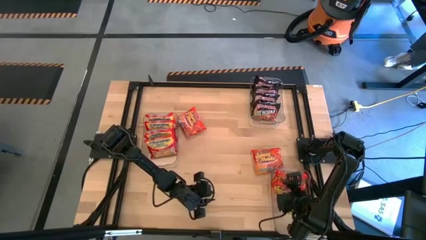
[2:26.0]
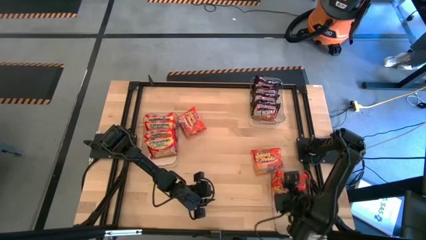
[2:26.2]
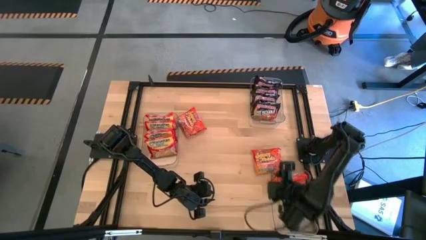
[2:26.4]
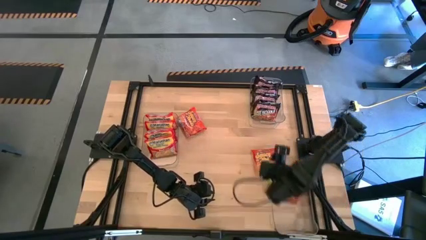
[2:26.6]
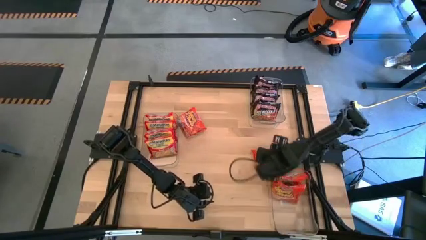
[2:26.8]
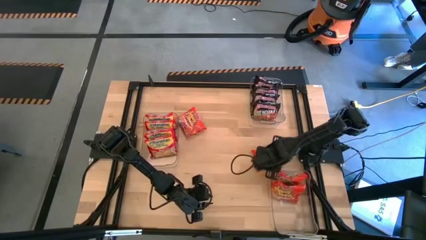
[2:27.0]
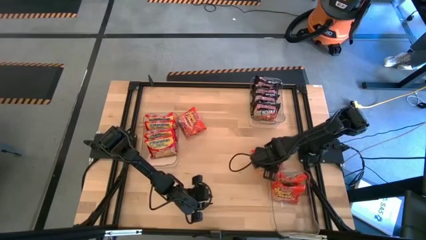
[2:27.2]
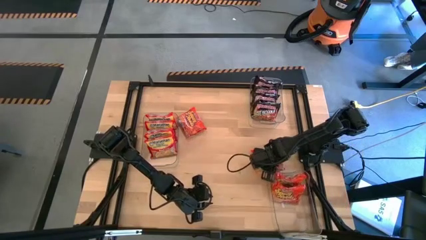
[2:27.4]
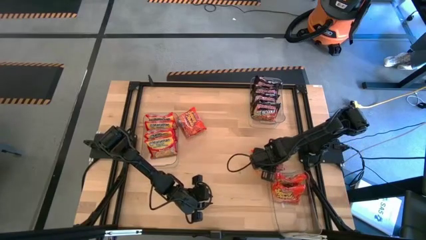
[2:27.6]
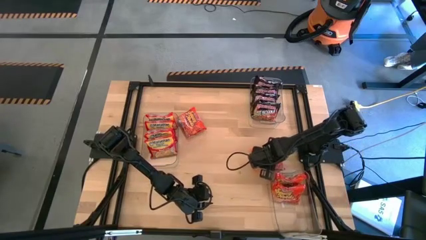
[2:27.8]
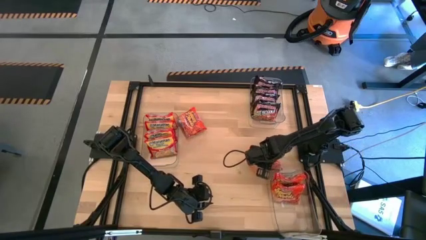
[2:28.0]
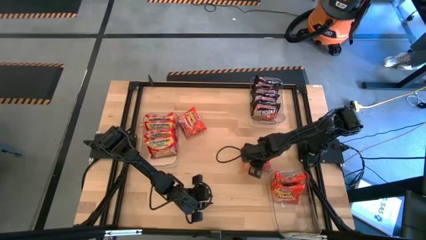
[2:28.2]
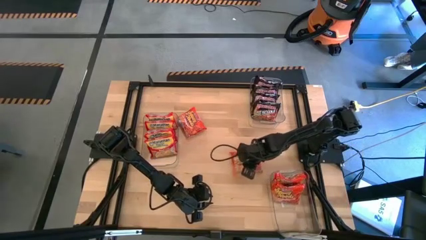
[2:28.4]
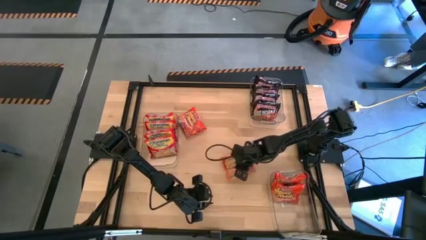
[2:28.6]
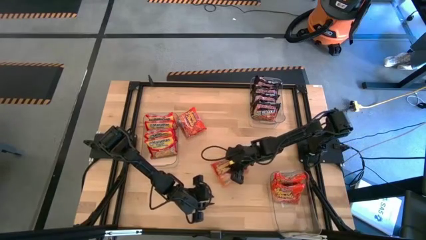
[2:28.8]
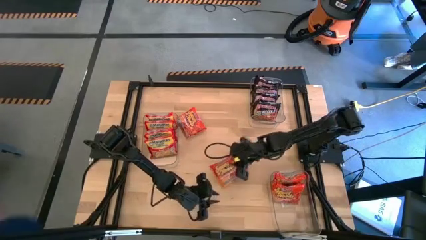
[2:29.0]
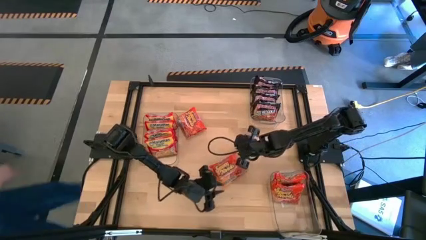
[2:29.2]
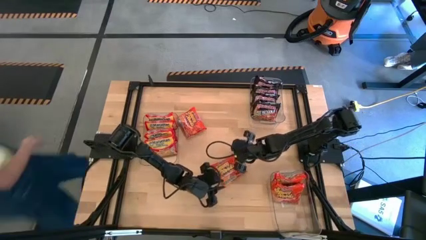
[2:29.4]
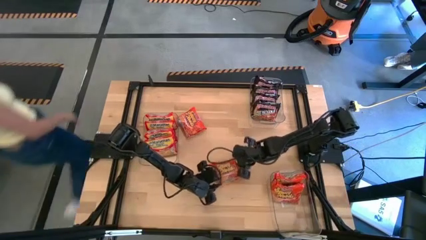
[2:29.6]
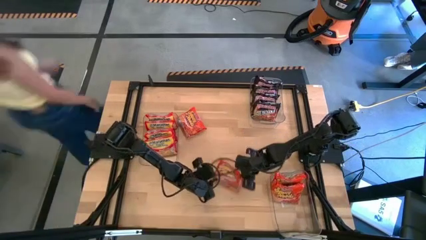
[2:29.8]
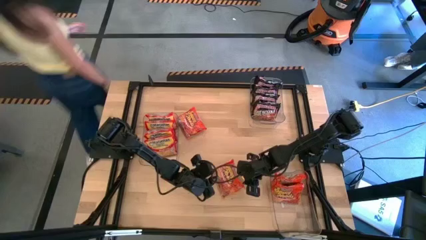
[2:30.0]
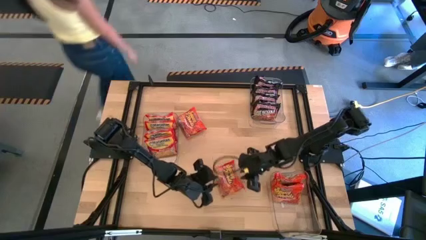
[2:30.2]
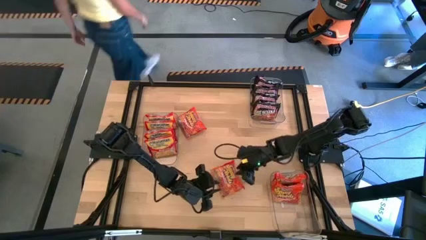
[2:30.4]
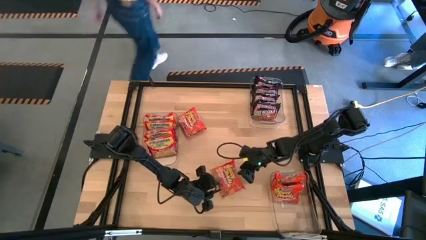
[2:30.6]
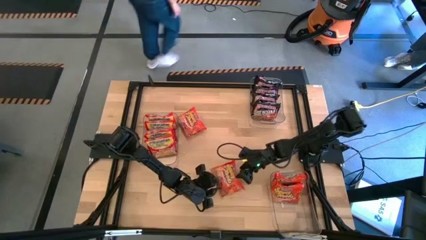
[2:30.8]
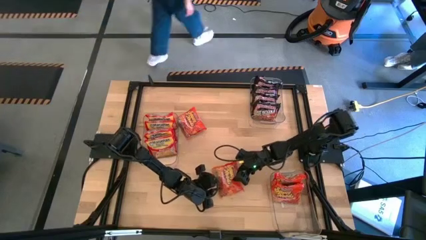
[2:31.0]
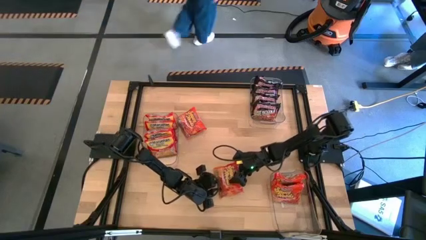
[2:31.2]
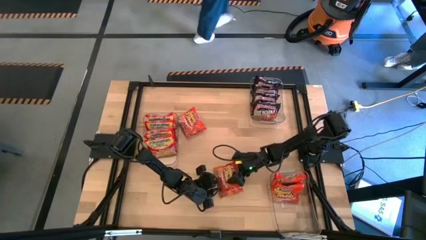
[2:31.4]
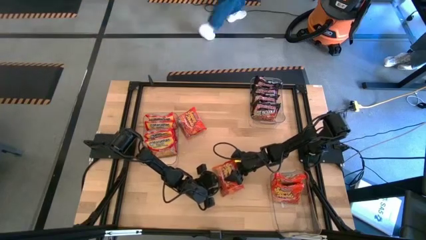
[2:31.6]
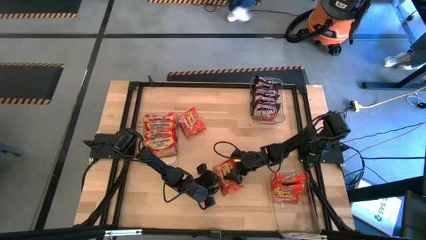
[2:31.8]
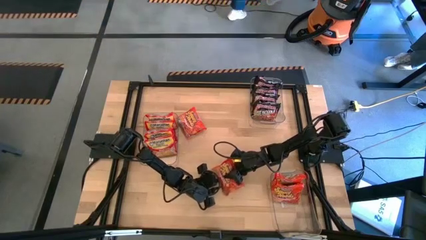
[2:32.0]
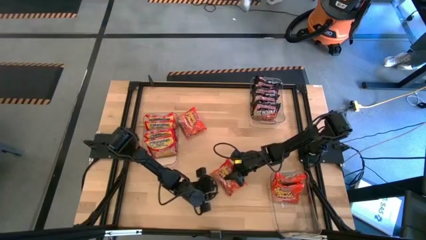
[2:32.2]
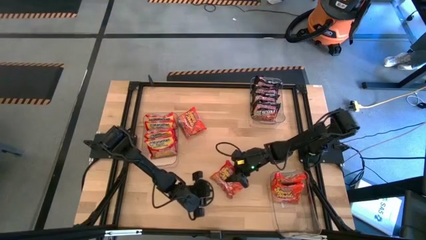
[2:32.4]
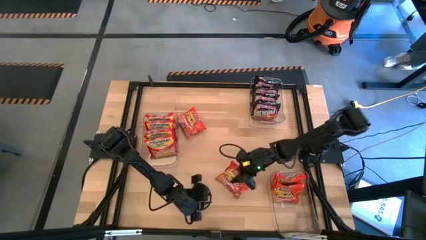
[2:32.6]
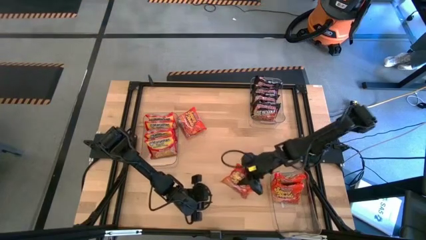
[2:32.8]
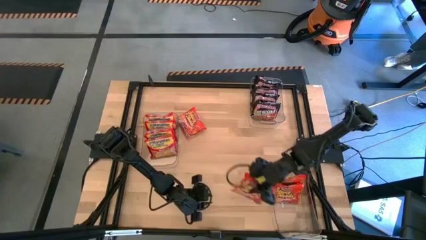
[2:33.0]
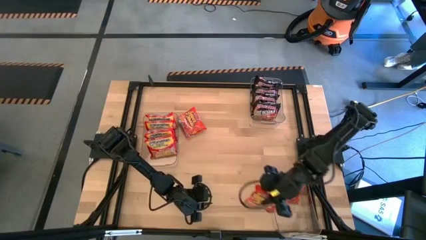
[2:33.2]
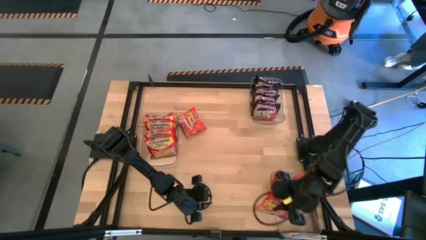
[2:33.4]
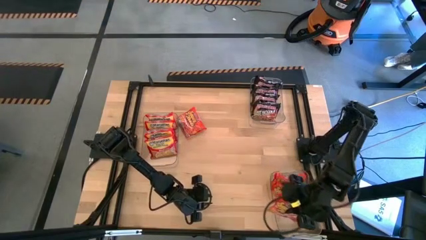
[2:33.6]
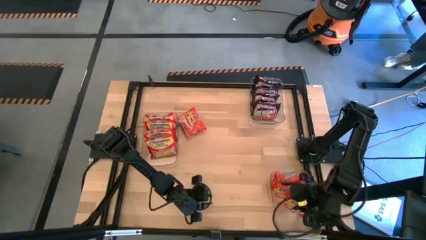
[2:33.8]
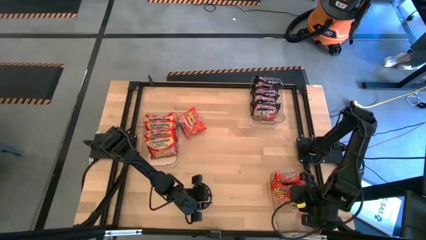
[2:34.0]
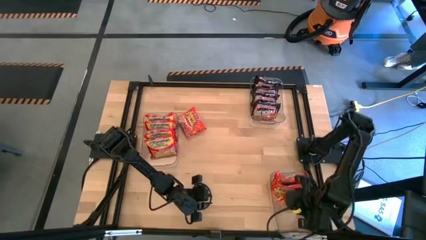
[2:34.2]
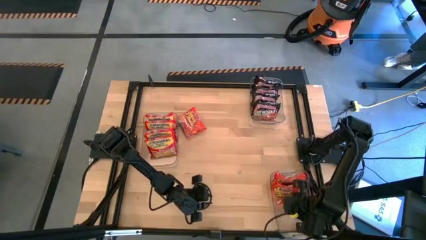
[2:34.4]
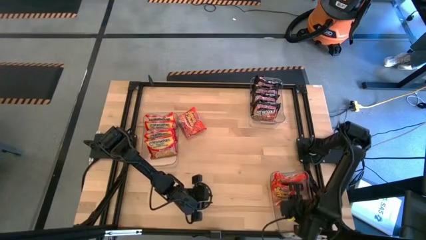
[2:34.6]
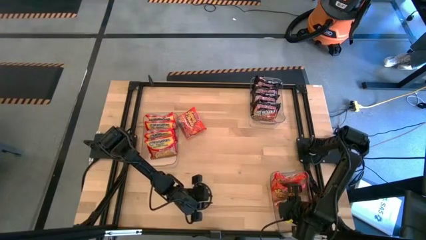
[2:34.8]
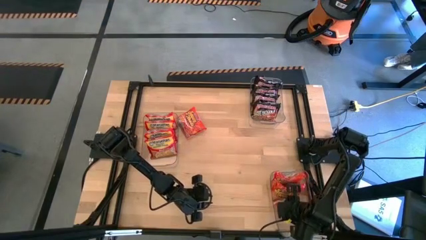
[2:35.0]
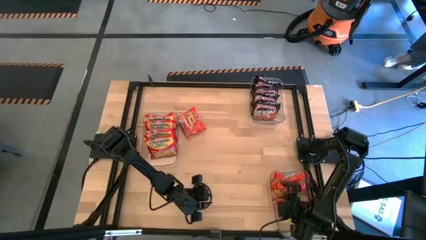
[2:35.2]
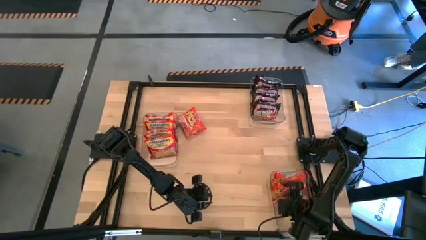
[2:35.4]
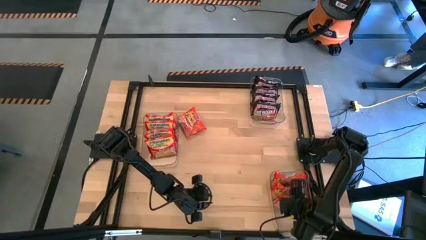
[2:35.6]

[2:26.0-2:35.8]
Task: Sort Maruchan noodles
Put the orange noodle pack into the bottom transparent bin

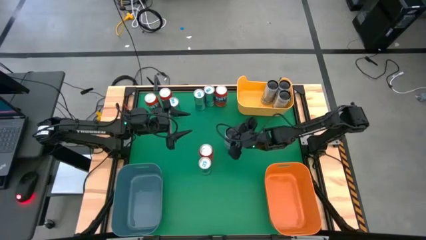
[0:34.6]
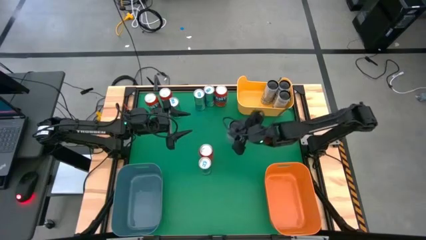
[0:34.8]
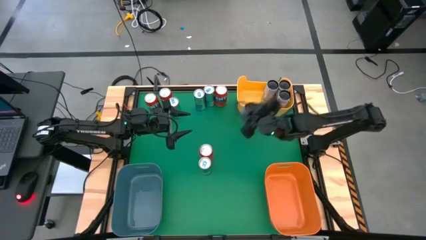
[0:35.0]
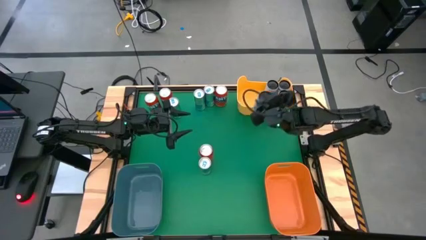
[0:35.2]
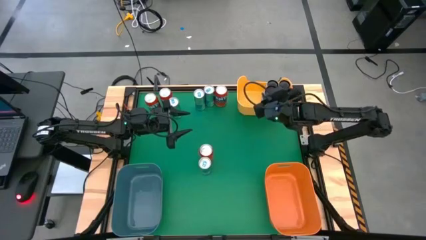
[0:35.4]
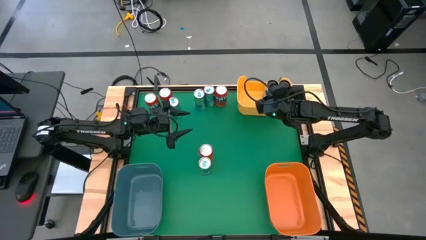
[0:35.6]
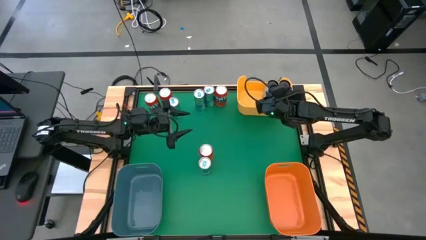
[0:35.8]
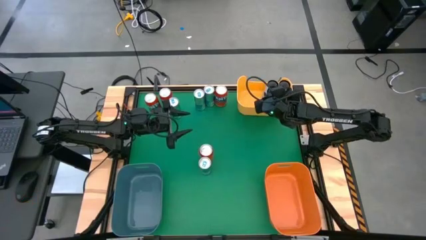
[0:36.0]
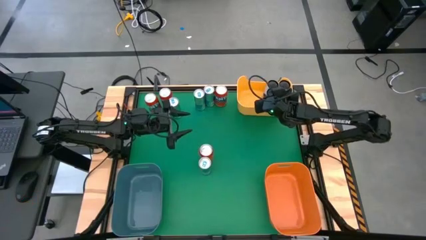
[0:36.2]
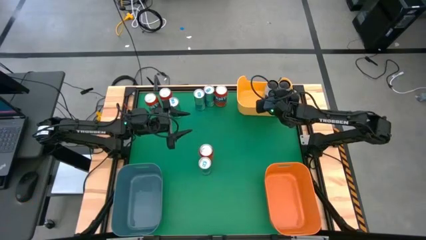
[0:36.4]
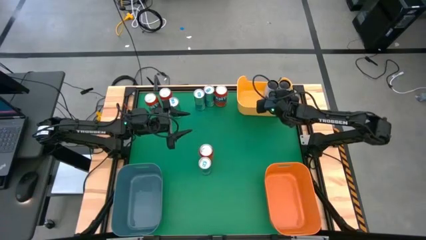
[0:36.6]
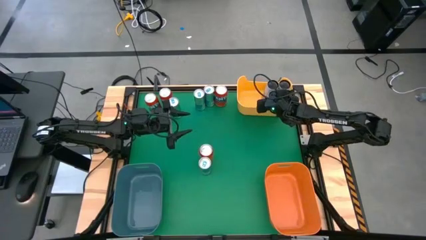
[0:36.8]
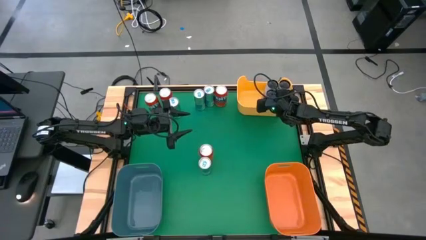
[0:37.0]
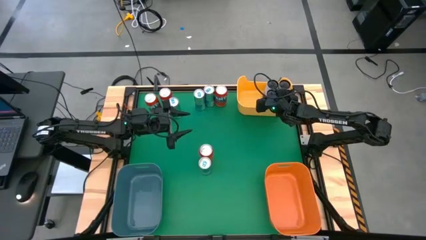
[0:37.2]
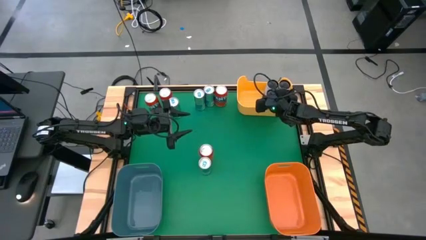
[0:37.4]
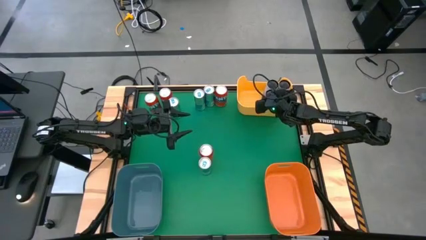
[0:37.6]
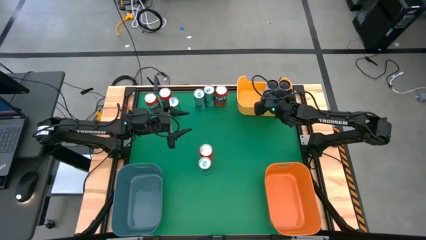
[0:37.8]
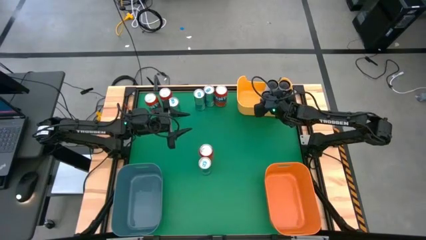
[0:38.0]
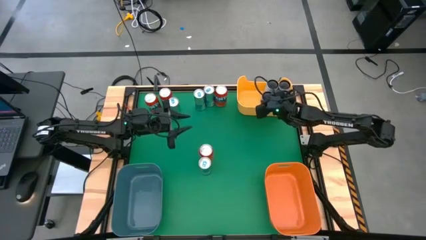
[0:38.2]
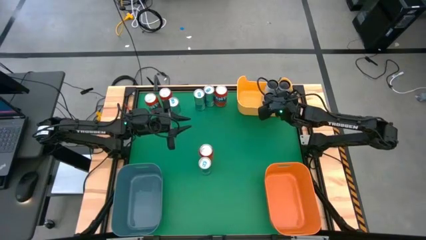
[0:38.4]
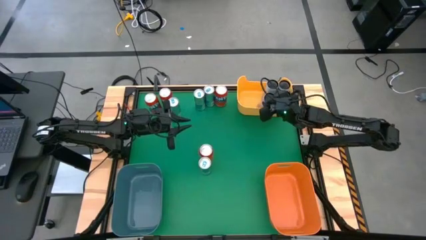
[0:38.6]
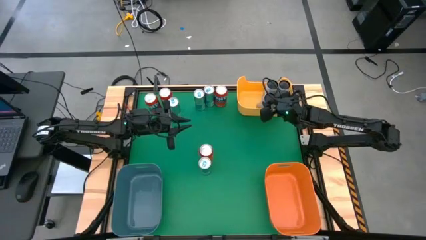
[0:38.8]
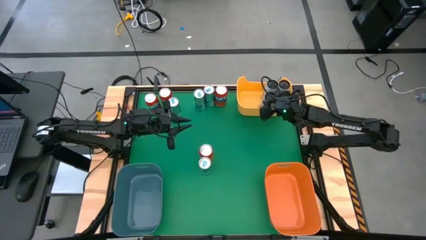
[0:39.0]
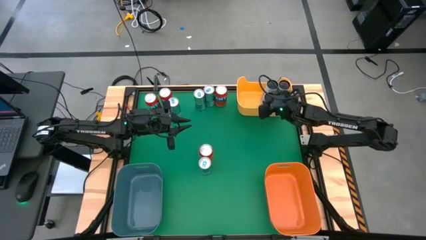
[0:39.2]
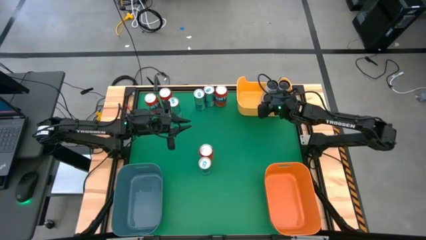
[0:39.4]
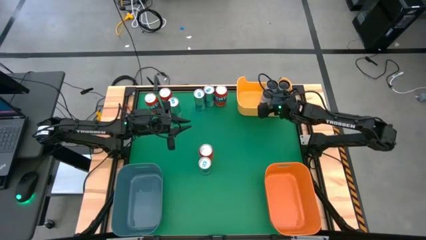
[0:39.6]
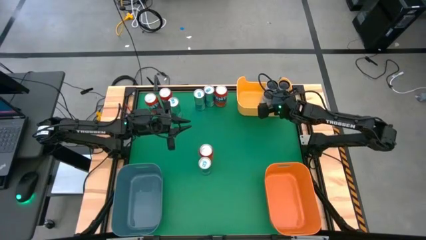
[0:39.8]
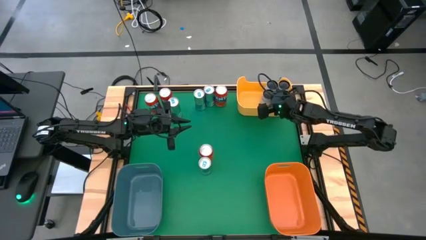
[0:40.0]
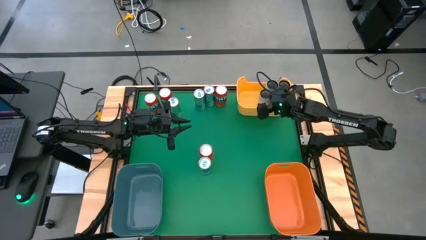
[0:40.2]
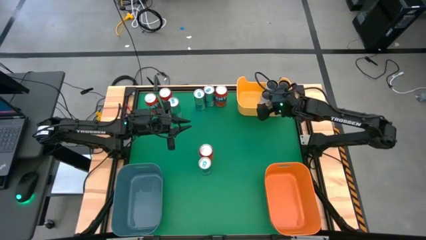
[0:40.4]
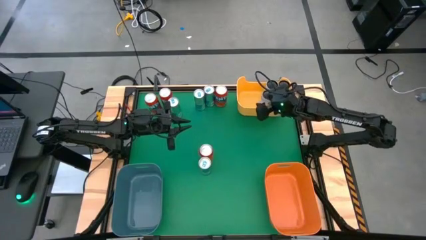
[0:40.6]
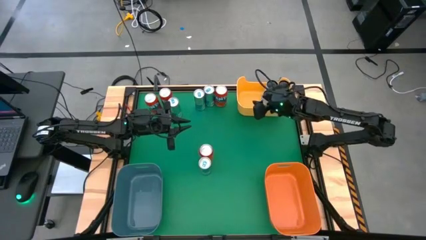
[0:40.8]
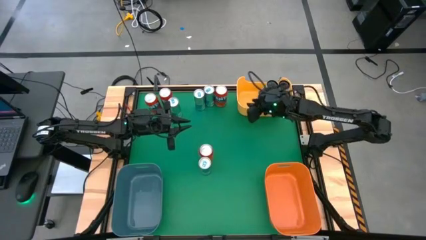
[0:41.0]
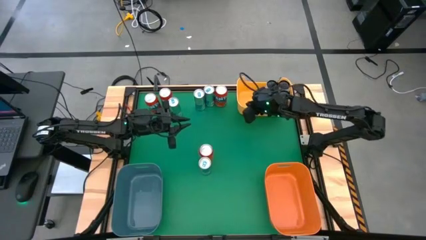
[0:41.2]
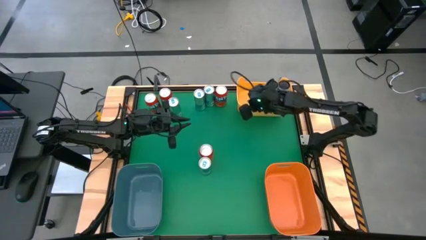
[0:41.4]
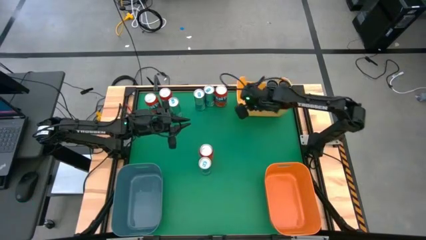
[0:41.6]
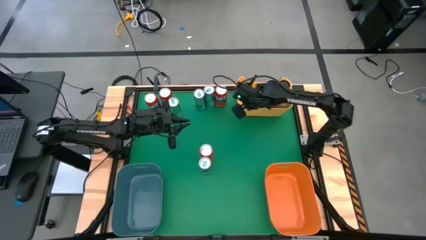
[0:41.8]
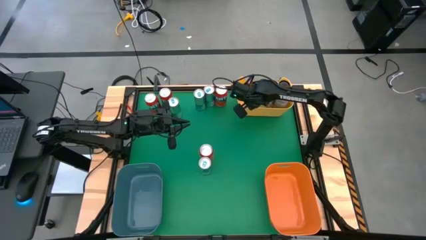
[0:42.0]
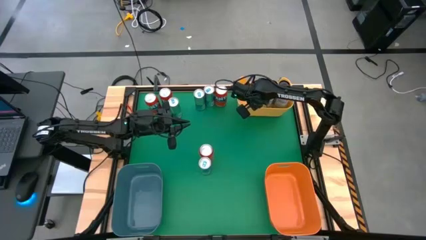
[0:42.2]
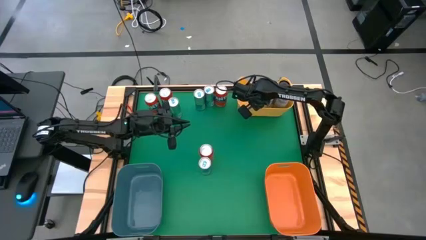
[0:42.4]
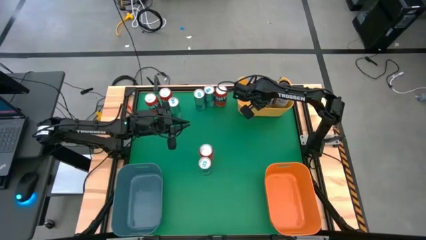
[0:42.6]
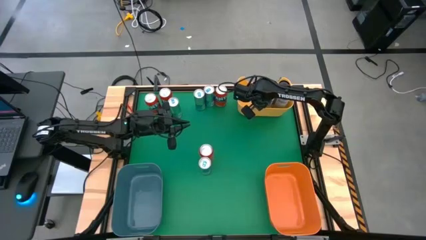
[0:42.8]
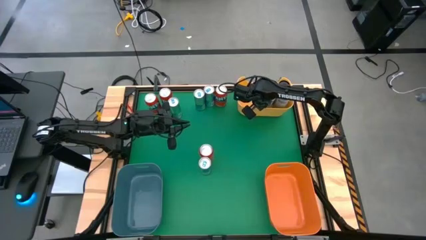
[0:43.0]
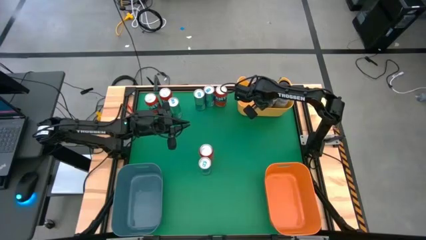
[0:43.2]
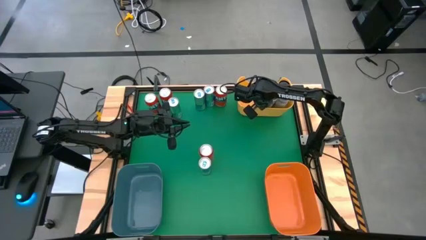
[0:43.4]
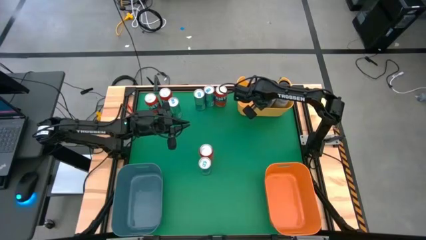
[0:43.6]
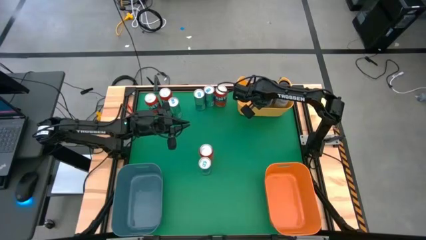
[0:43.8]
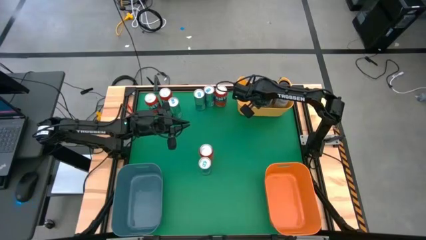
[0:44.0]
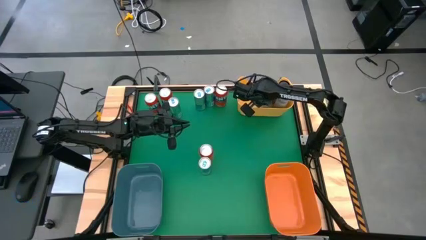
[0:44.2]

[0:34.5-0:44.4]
Task: Sort soda cans
Put the white-blue soda can into the yellow bin
